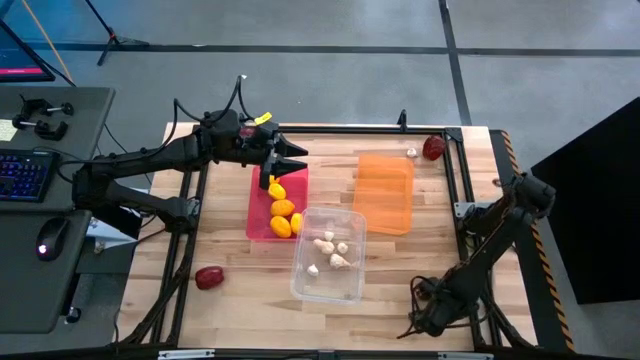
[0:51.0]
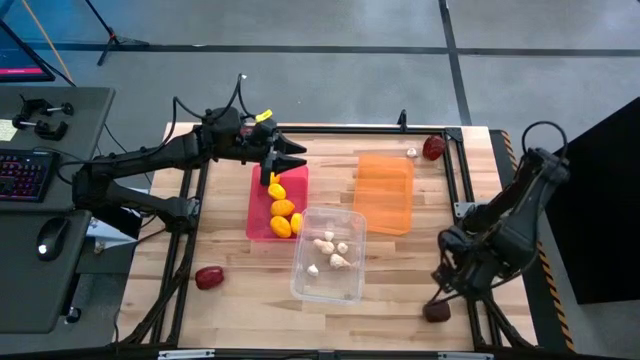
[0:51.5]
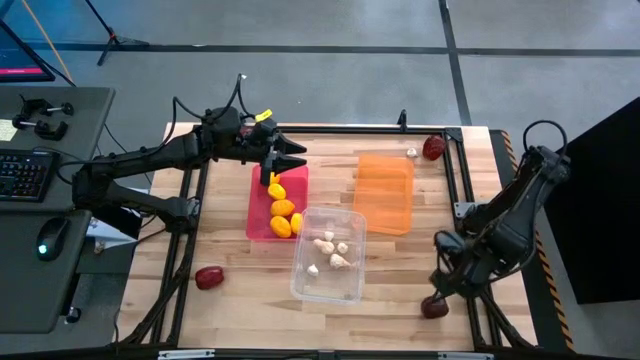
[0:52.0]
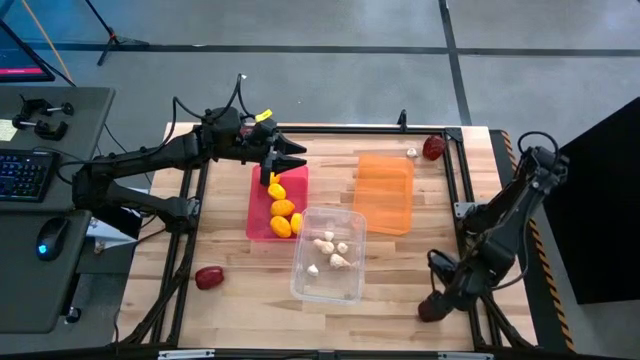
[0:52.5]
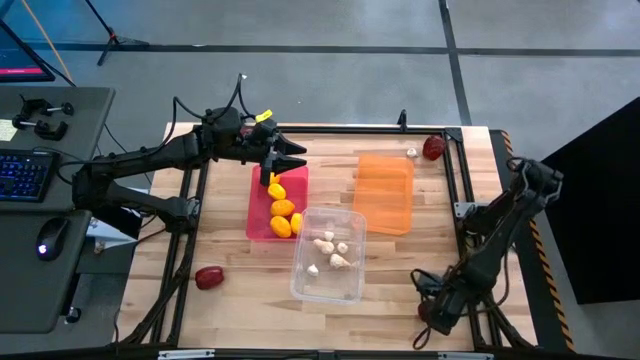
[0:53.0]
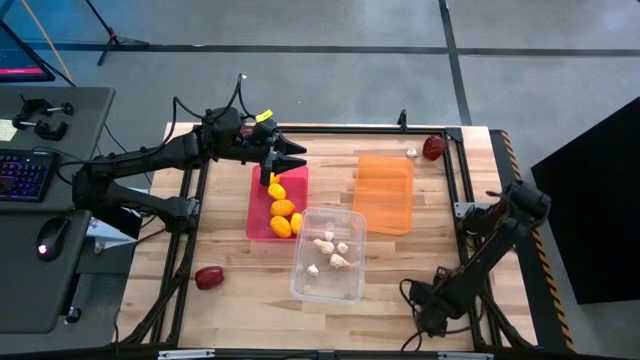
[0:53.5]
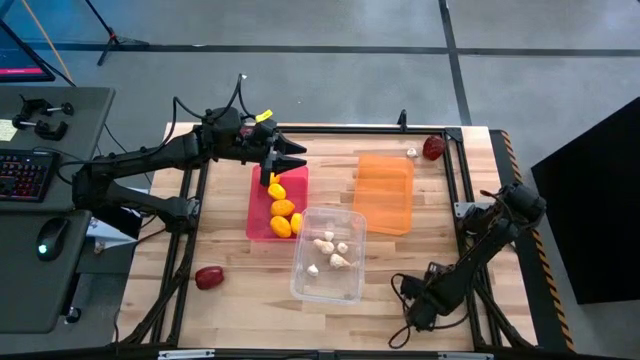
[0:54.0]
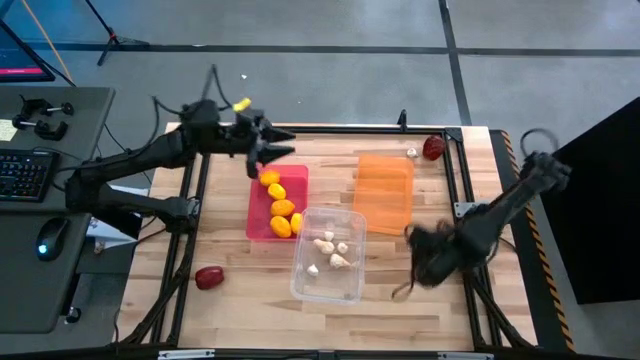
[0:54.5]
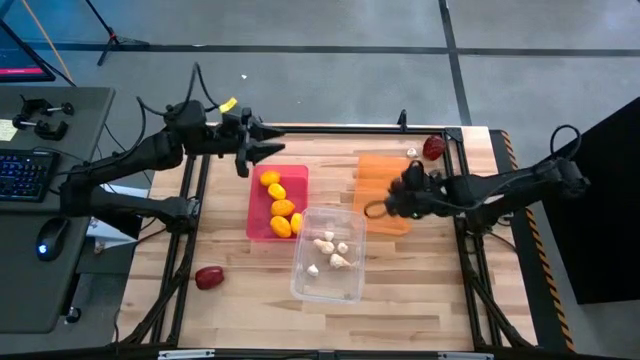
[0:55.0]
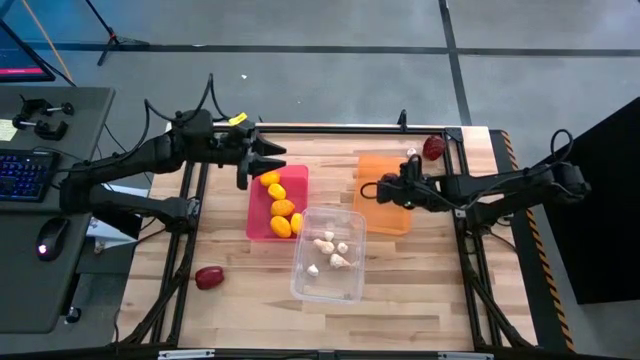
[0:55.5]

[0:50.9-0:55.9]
Task: Sort produce into baskets
Put the apple into the orange bin

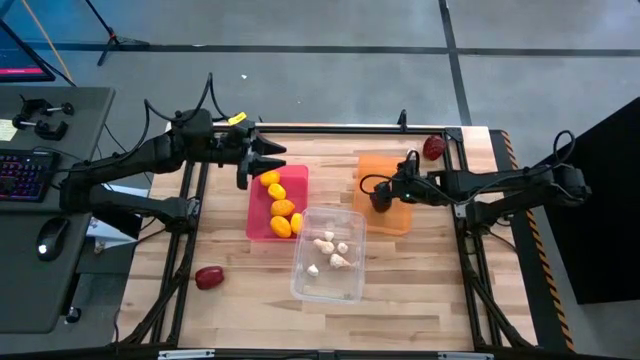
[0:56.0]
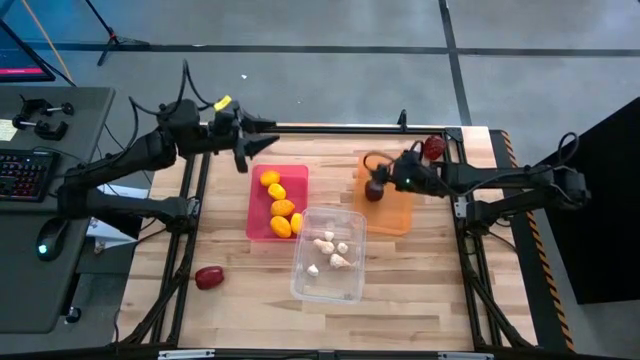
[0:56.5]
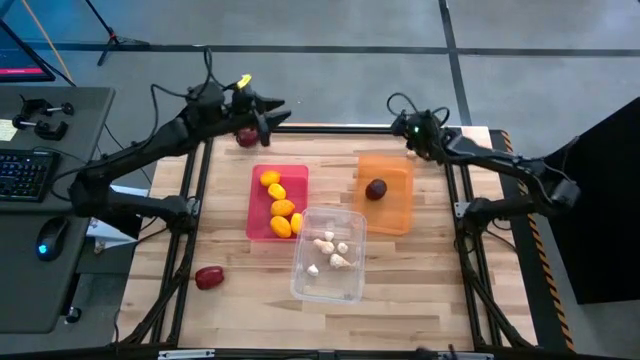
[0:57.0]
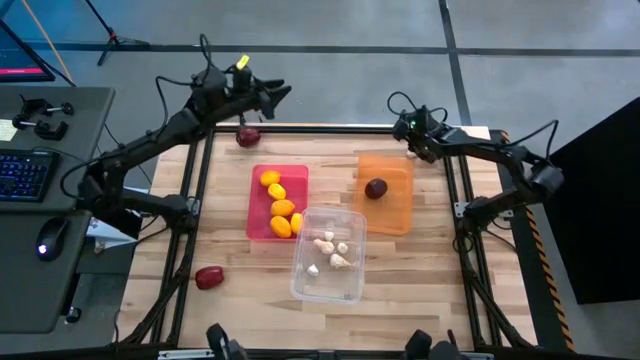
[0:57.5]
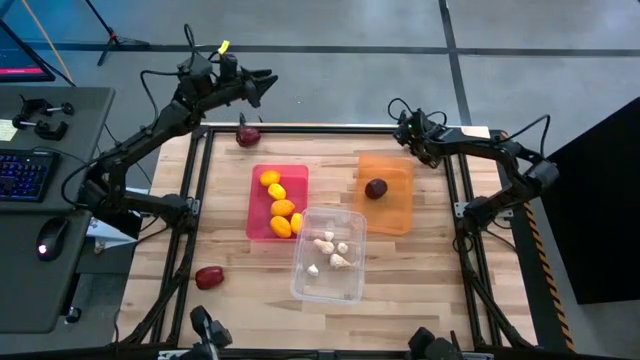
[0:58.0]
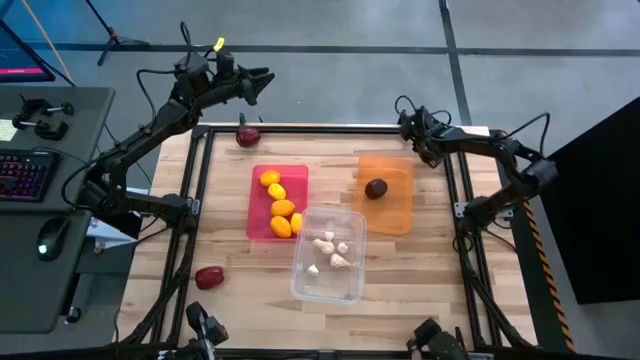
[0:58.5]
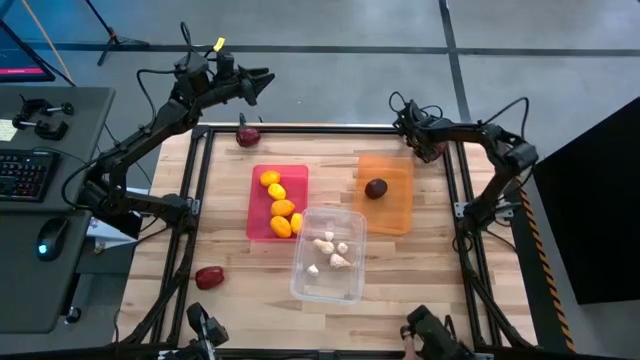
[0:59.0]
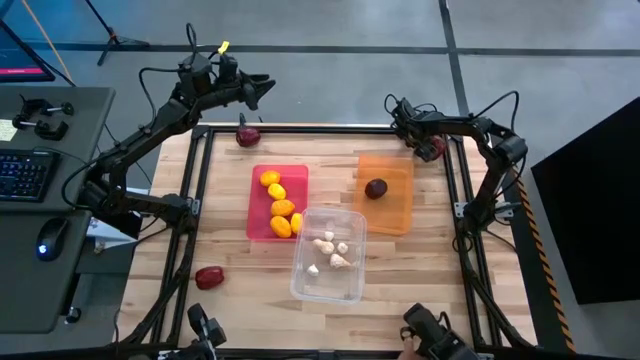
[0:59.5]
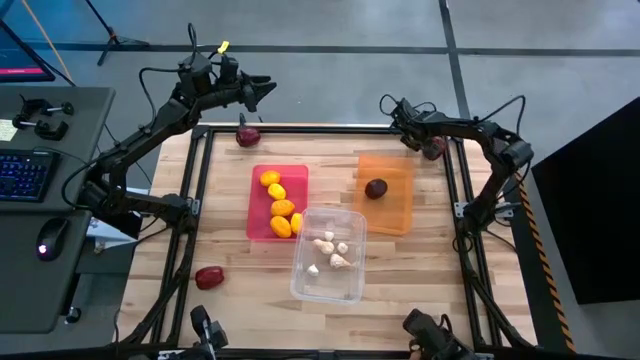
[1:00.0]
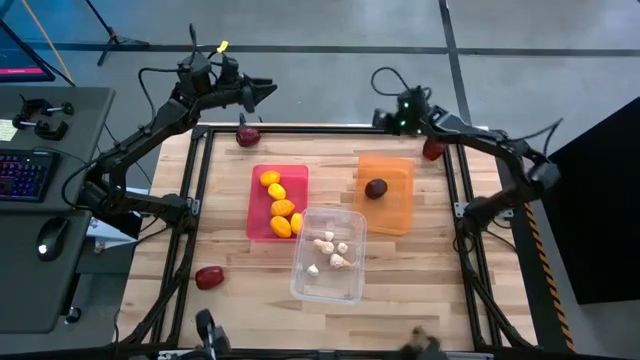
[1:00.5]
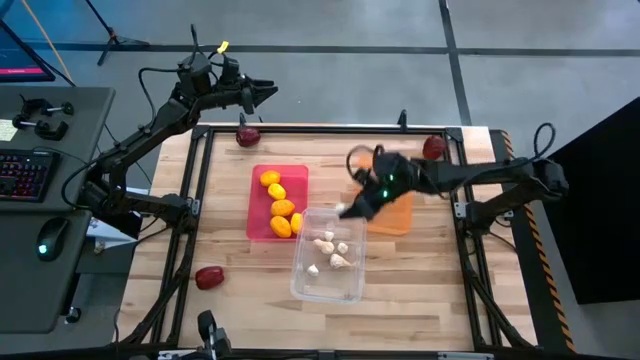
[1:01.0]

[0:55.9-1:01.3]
Put the garlic into the transparent bin

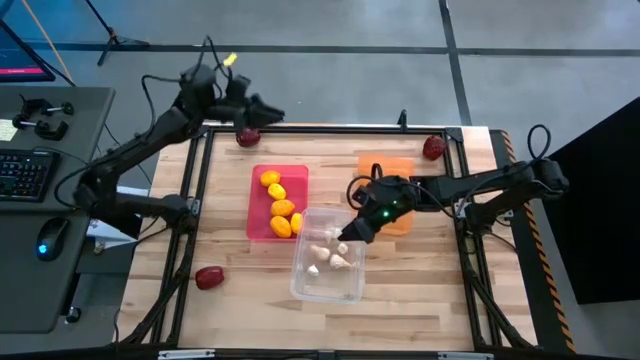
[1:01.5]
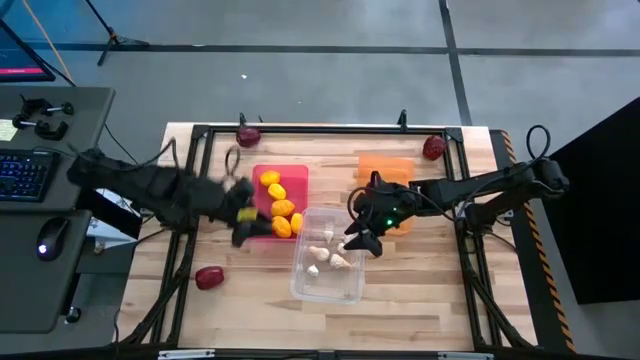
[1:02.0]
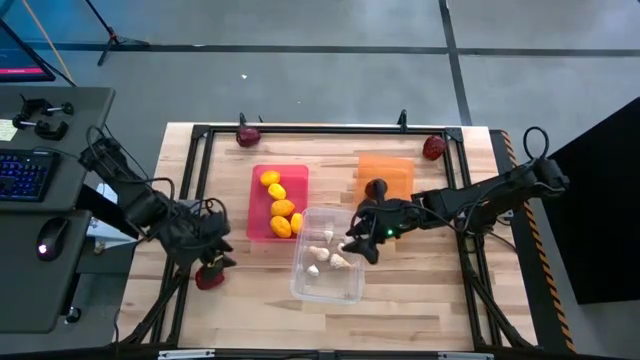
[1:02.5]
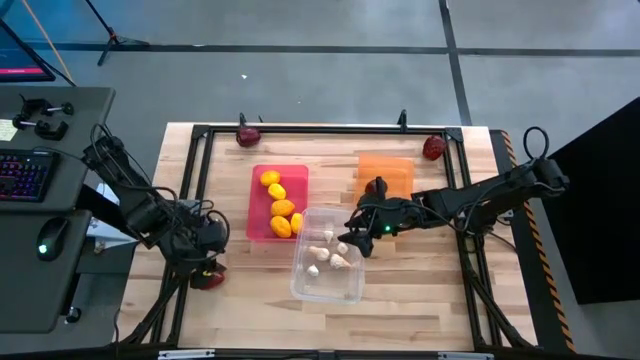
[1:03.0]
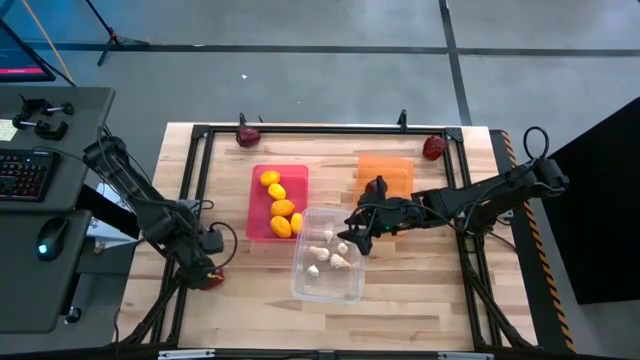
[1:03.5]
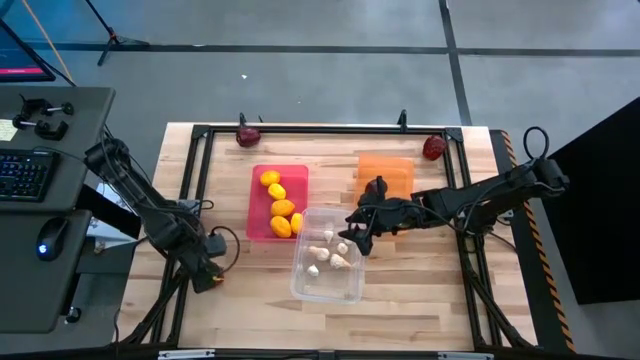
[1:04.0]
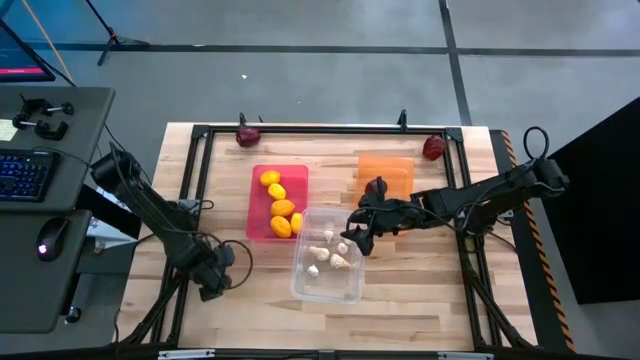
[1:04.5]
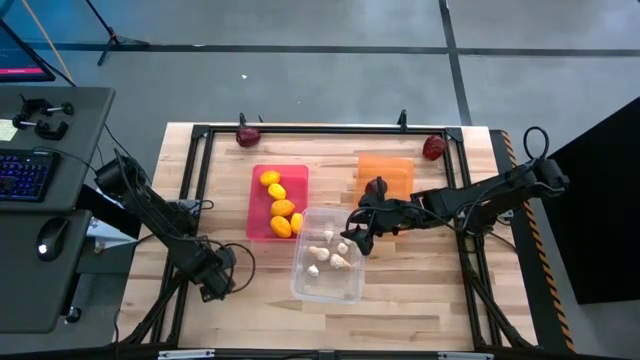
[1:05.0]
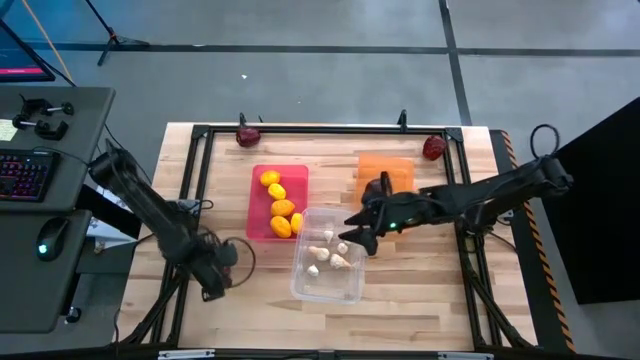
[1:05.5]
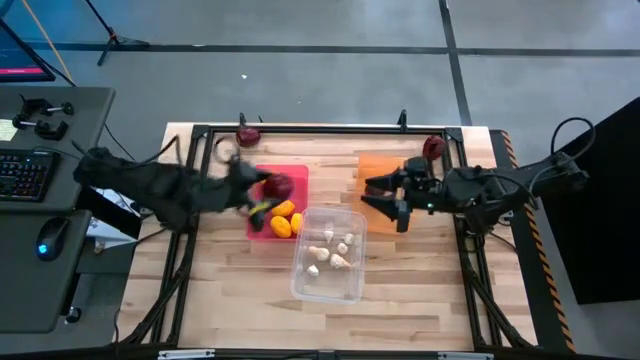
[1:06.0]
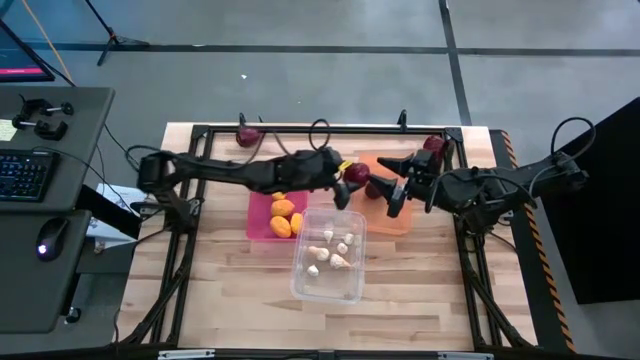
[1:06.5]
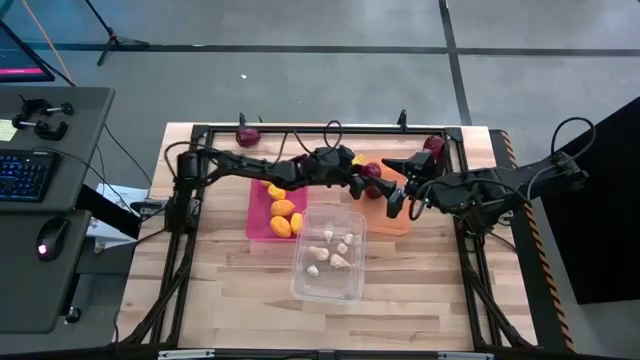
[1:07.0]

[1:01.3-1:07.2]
Put the apple into the orange bin

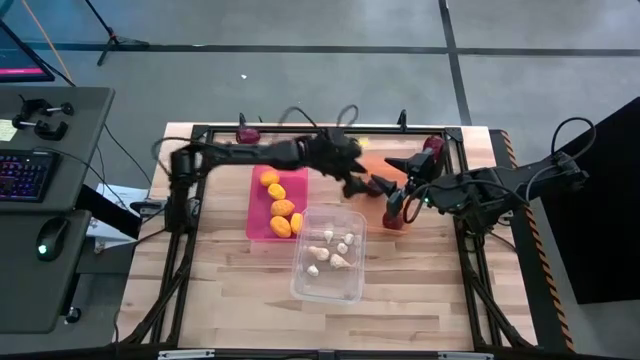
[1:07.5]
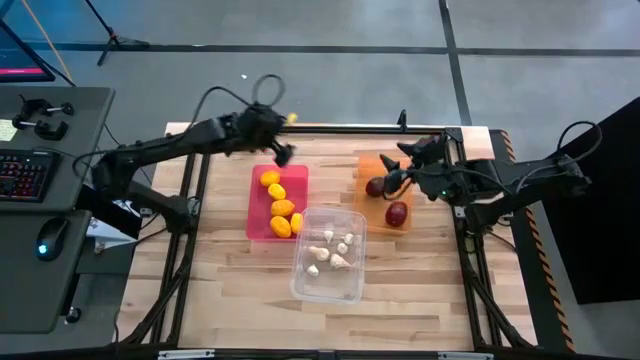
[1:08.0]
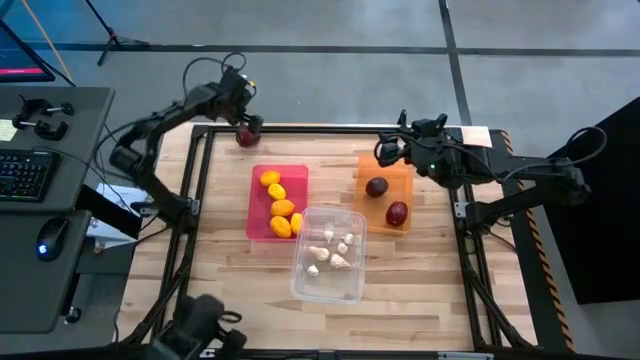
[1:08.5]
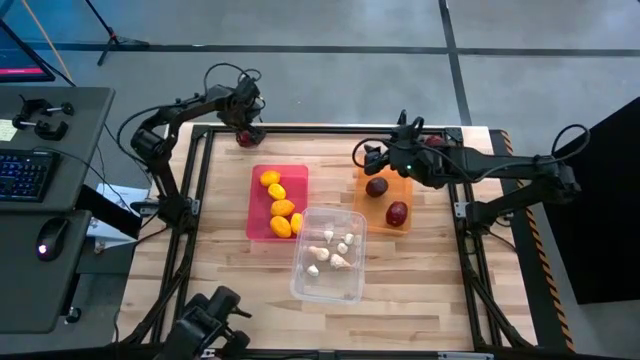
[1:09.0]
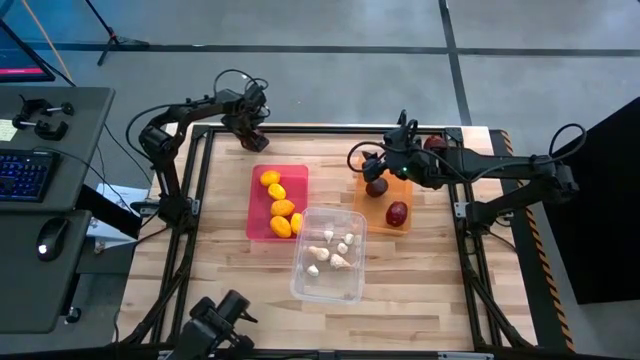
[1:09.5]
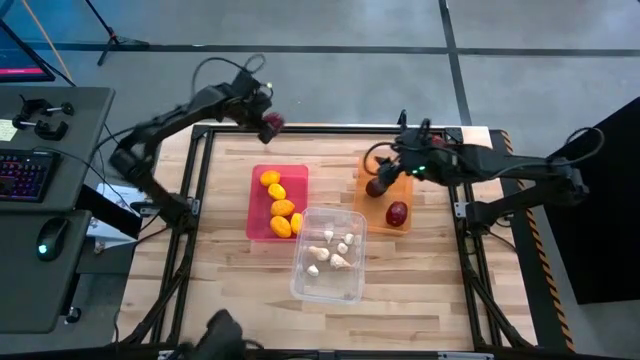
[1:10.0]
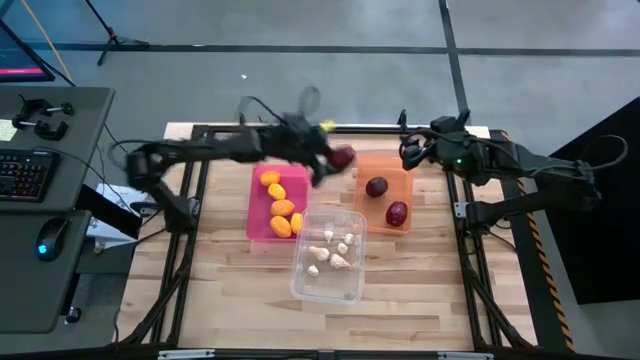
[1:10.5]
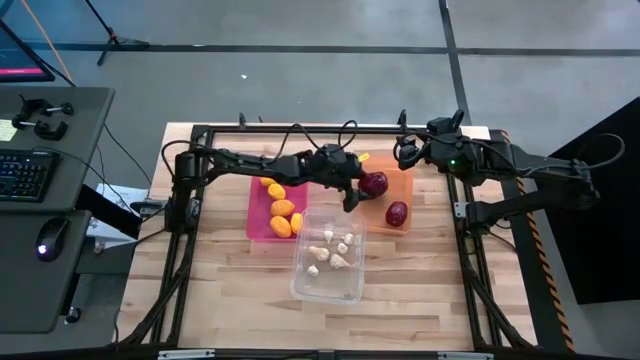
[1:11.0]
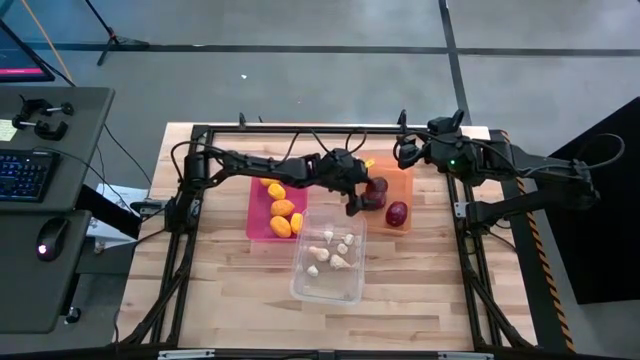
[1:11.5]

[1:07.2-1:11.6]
Put the apple into the orange bin
